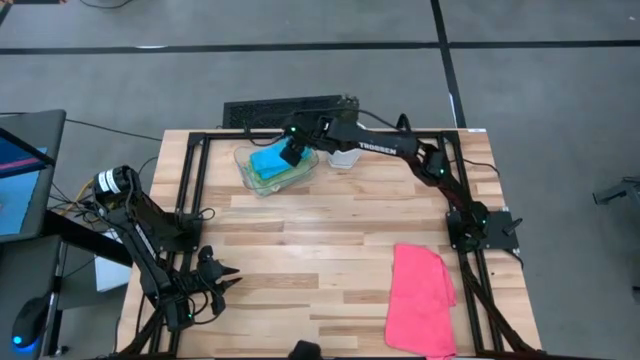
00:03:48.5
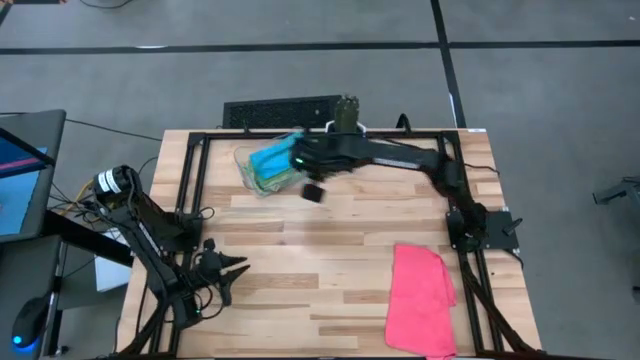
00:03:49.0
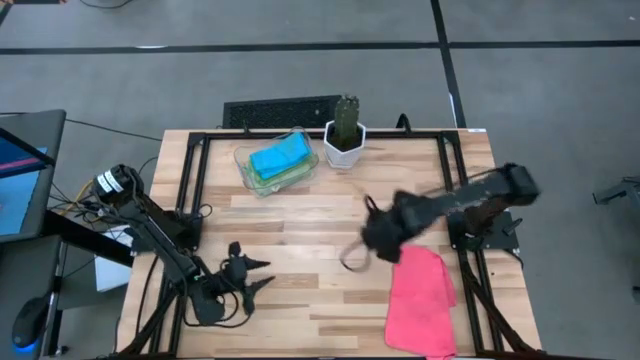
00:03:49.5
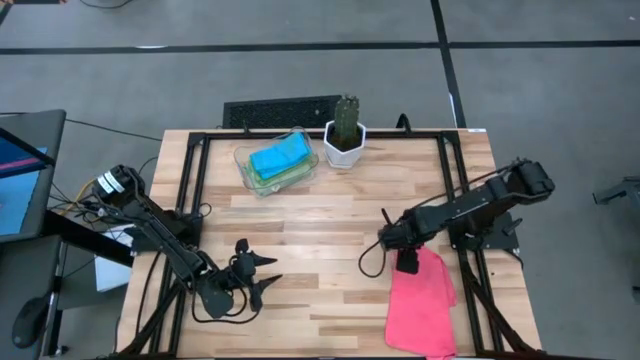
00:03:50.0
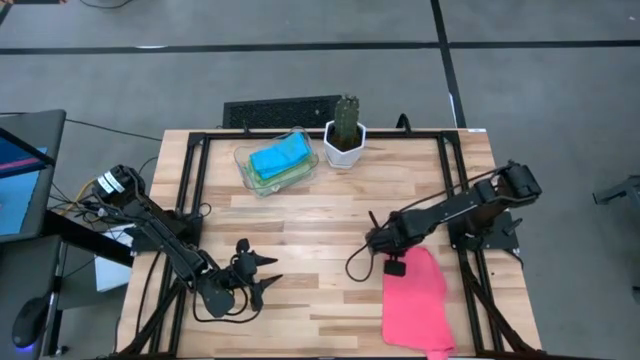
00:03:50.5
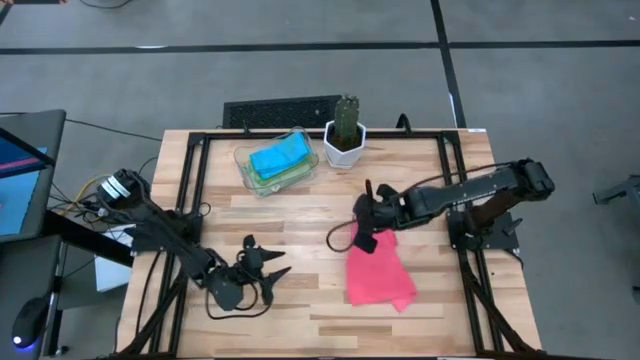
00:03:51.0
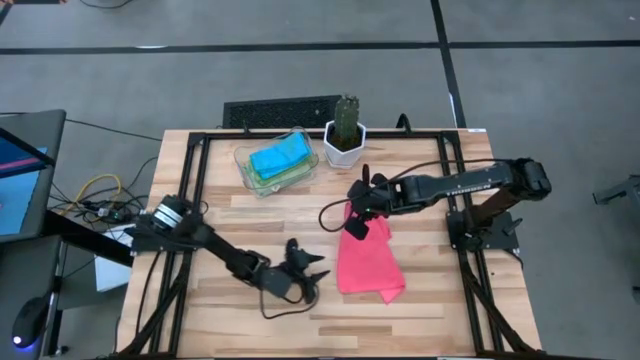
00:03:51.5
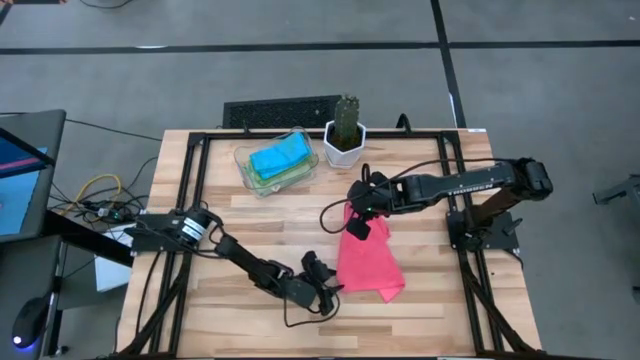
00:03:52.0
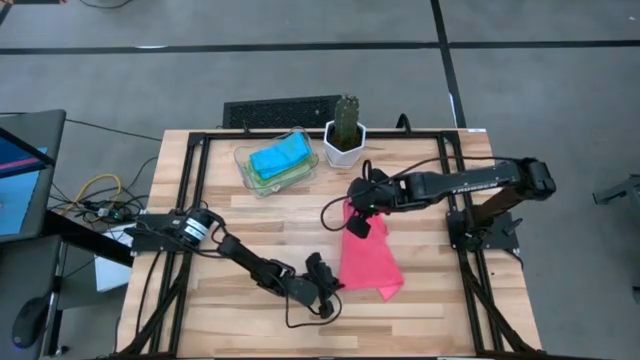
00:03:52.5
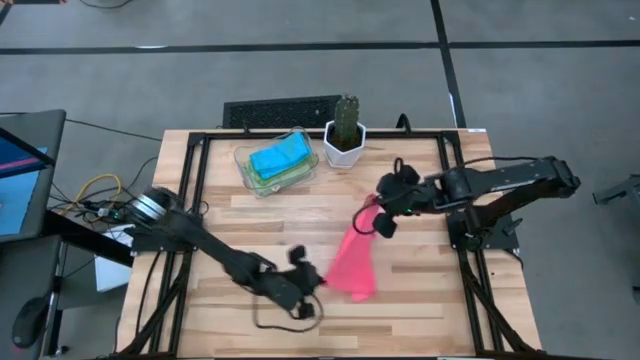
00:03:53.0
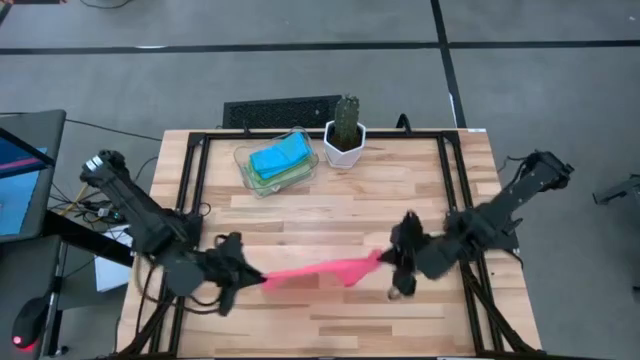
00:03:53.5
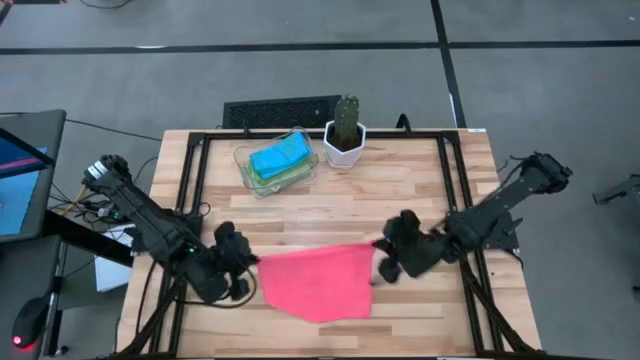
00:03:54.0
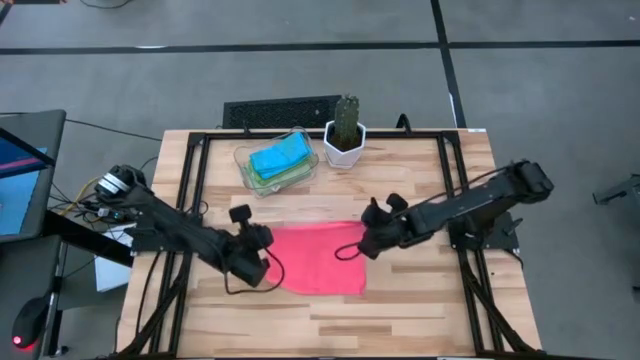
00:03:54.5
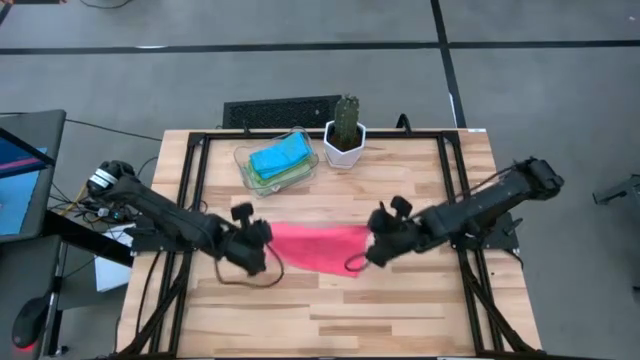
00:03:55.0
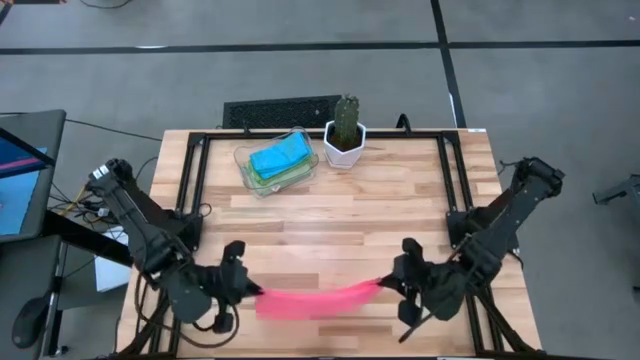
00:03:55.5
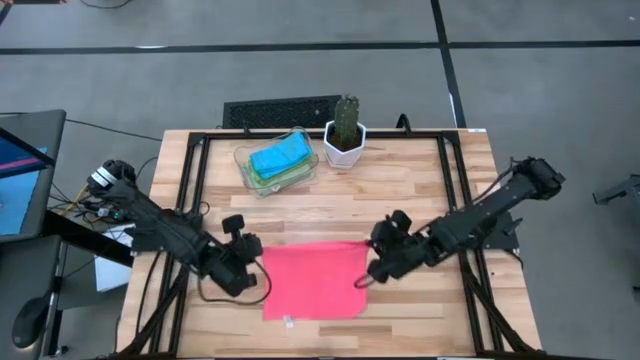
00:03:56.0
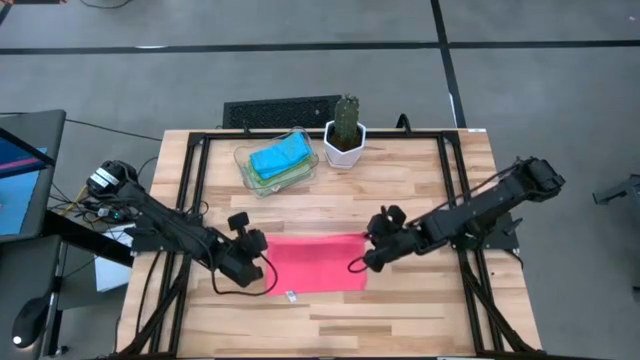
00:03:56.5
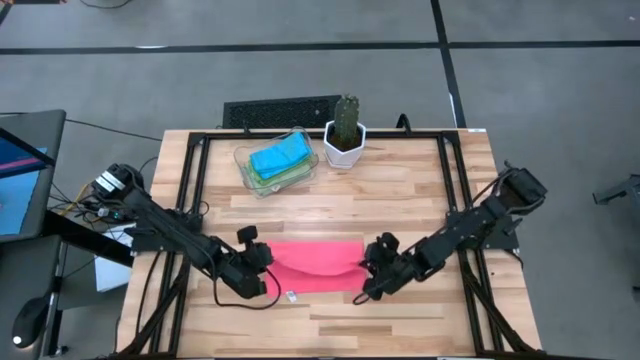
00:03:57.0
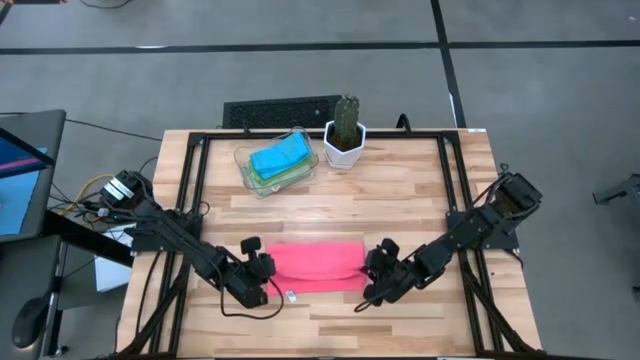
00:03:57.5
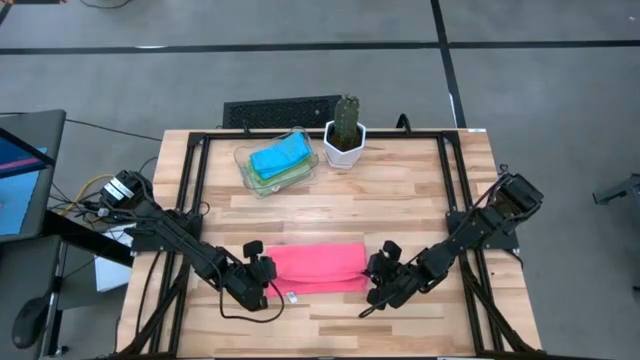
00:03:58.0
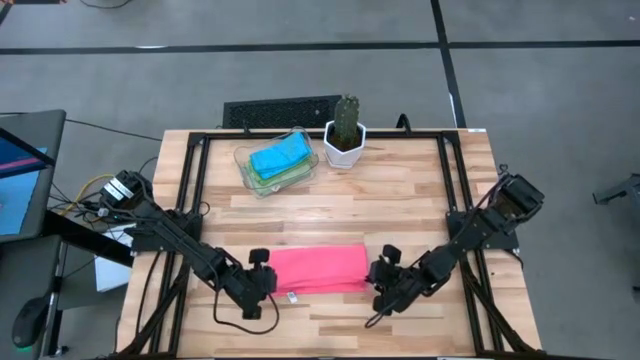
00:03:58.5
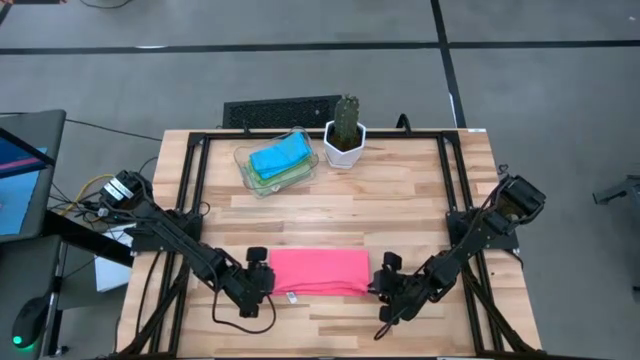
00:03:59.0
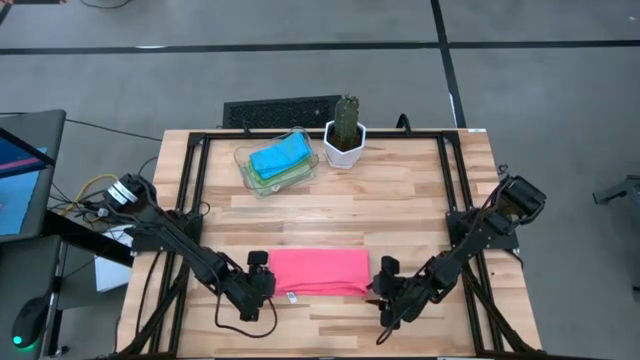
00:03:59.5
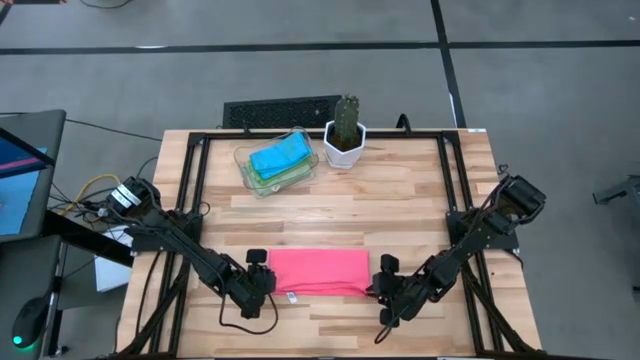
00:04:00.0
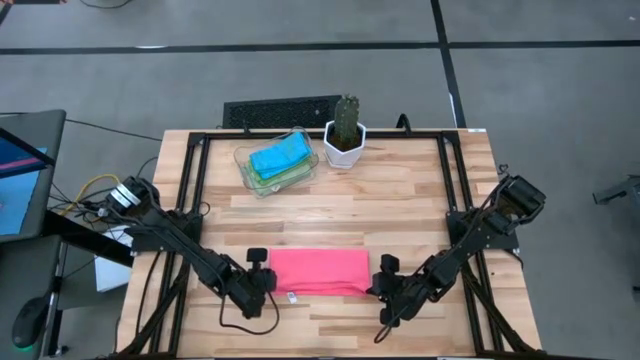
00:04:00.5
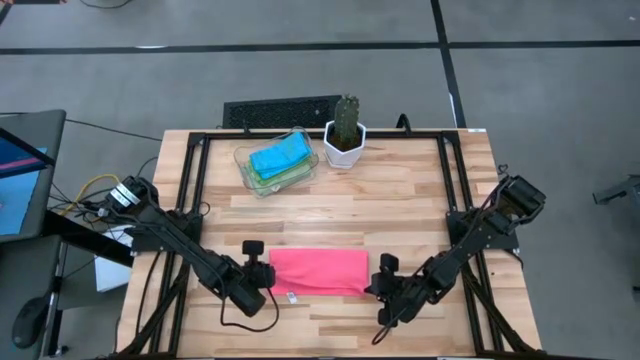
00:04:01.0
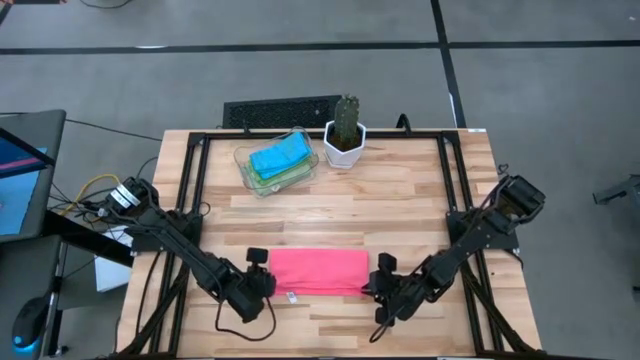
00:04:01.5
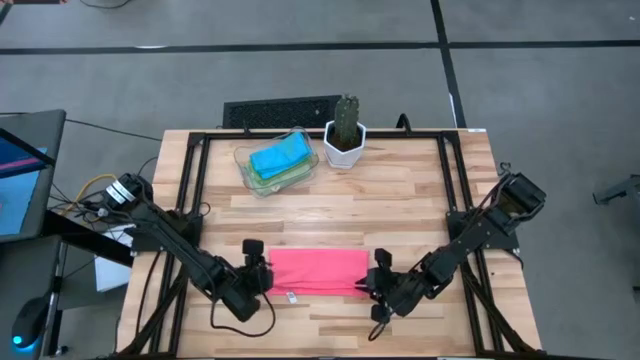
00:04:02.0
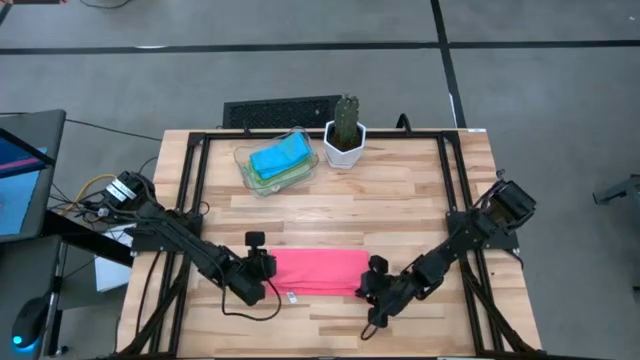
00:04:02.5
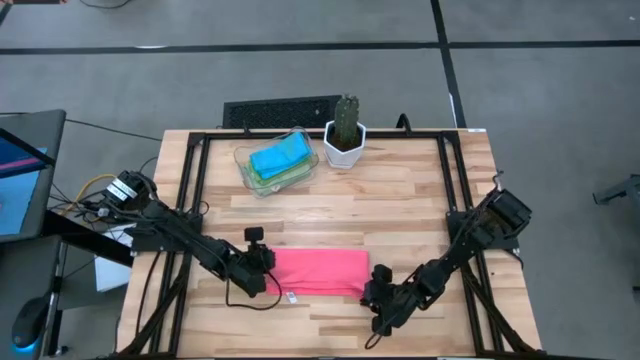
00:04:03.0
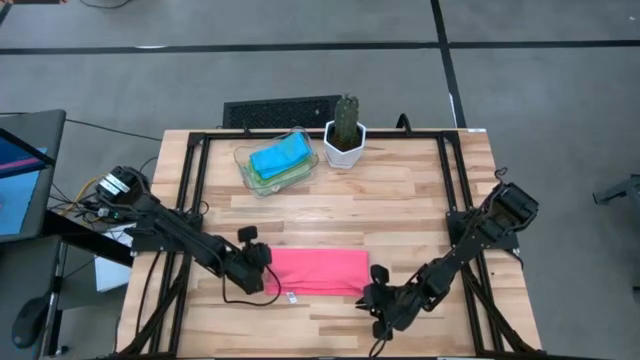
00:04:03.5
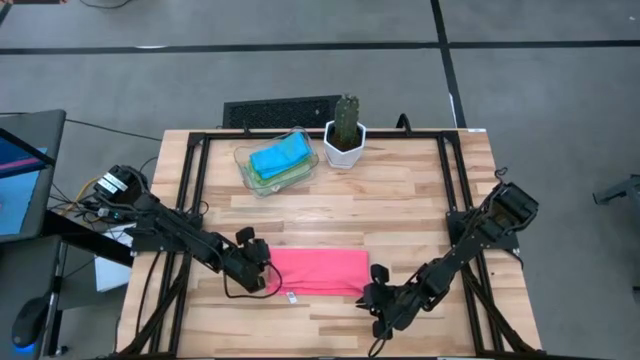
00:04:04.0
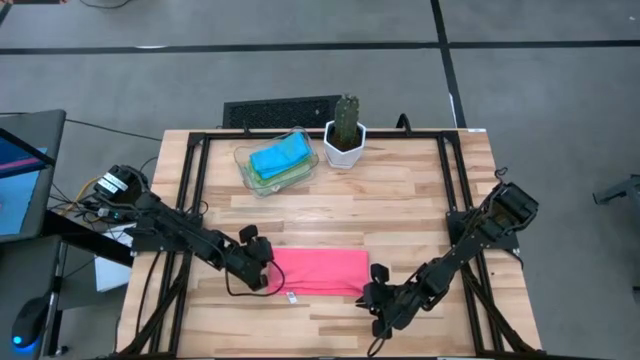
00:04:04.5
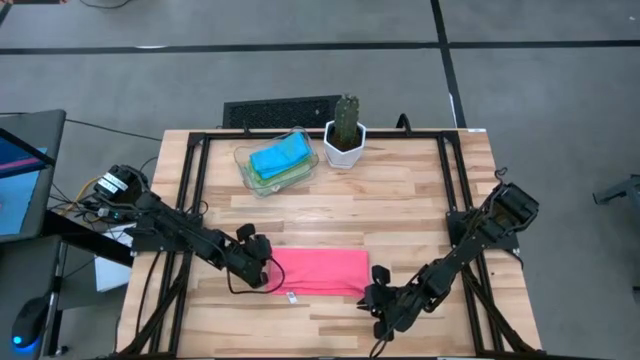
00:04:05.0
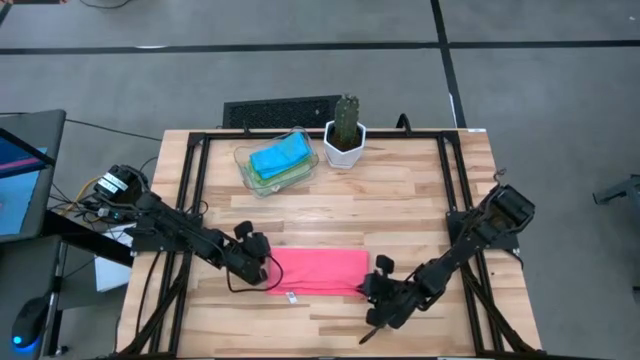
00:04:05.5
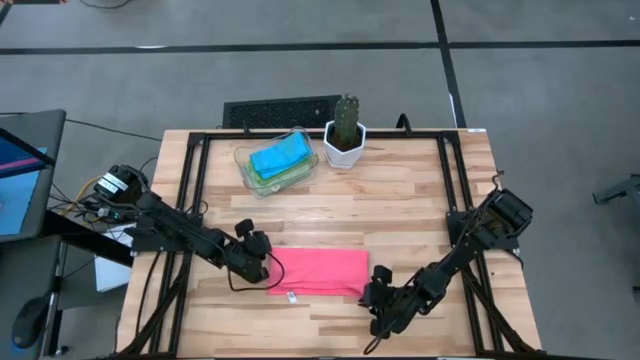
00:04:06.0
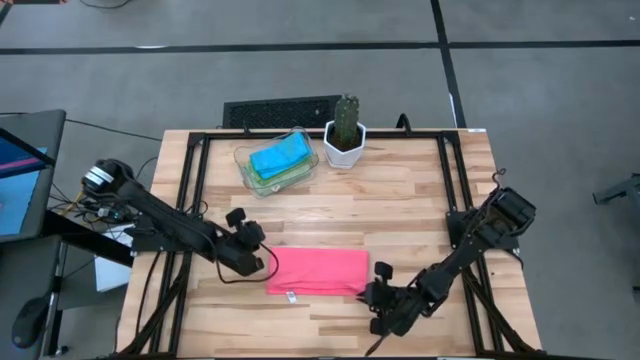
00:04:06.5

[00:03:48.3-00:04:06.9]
Task: Fold microfiber towels
Fold the pink microfiber towel

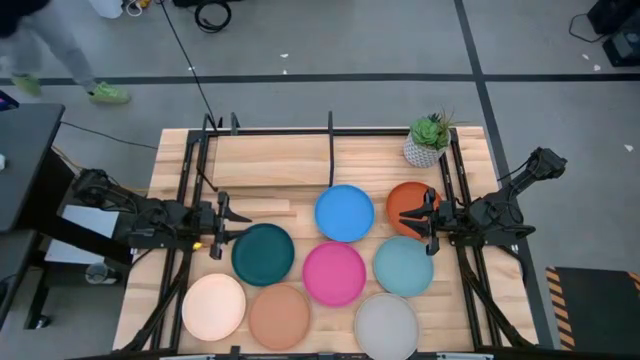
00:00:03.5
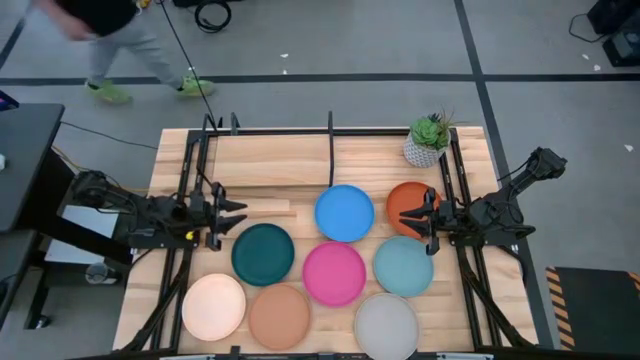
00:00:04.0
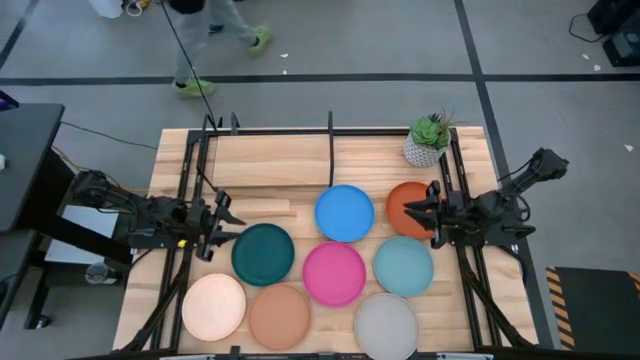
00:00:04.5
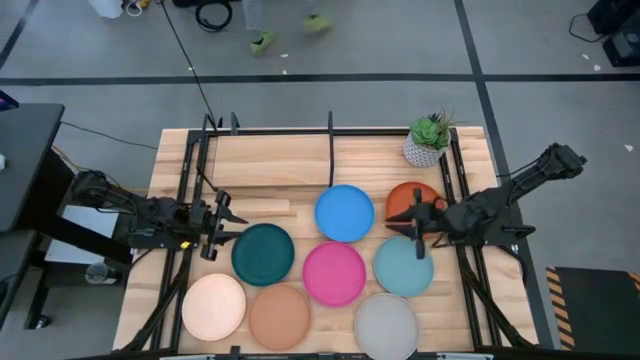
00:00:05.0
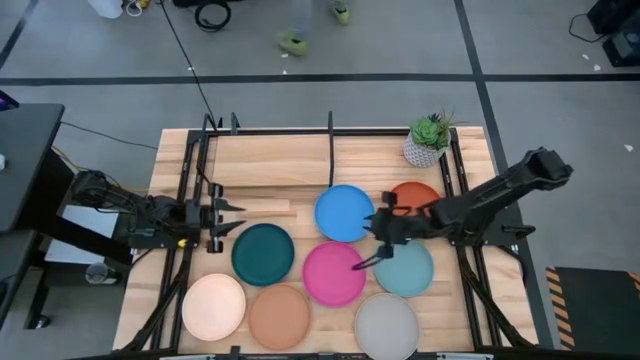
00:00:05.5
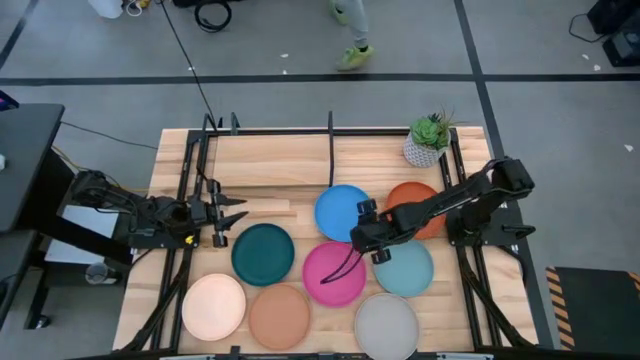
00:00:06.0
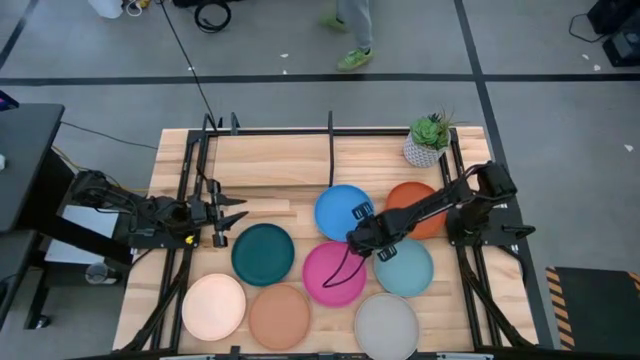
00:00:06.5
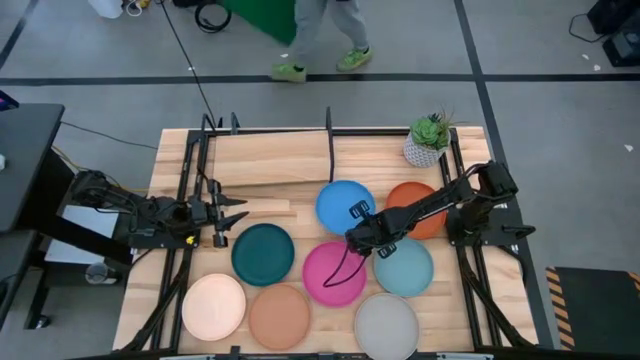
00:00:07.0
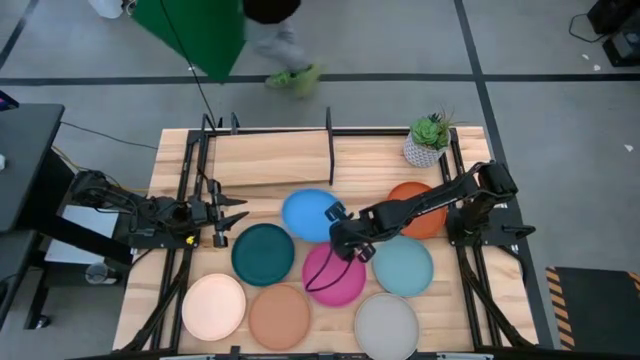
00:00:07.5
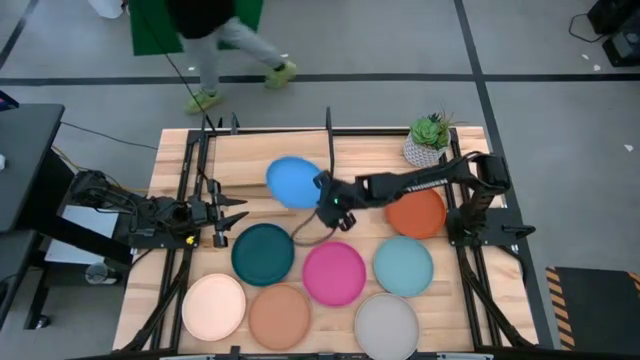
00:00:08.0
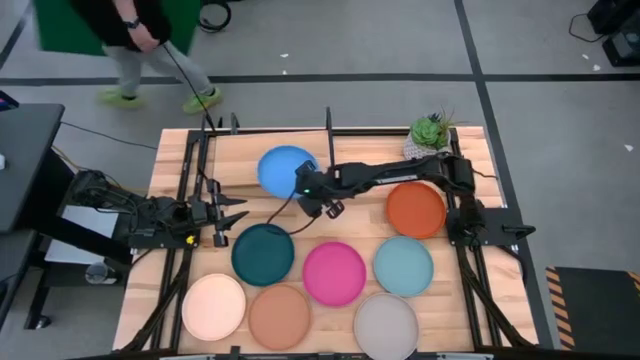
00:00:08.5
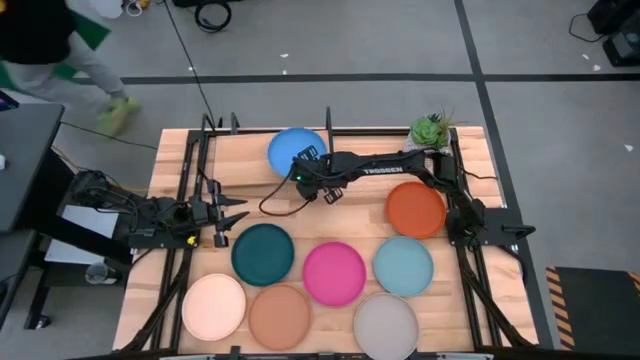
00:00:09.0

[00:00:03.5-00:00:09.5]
Task: Place and stack plates onto a shelf
Put the blue plate on the shelf
